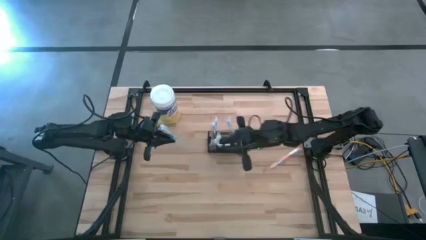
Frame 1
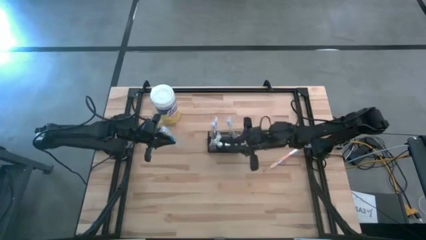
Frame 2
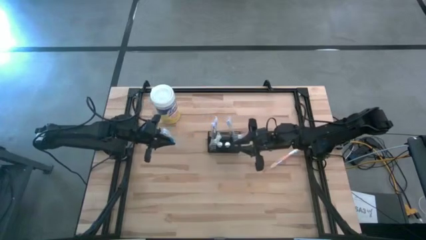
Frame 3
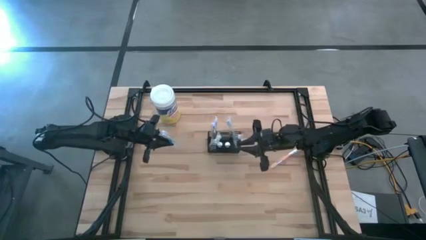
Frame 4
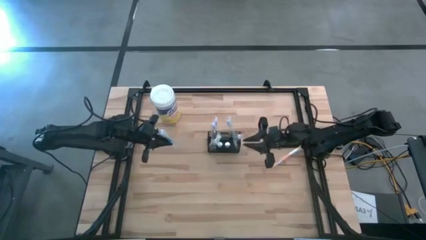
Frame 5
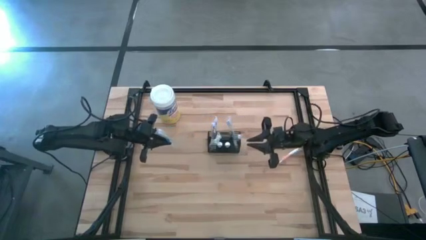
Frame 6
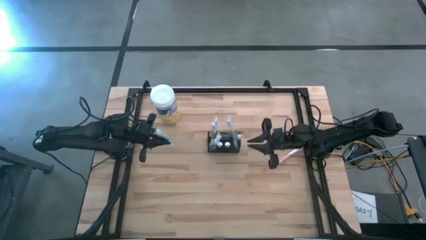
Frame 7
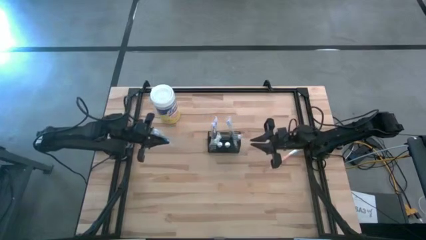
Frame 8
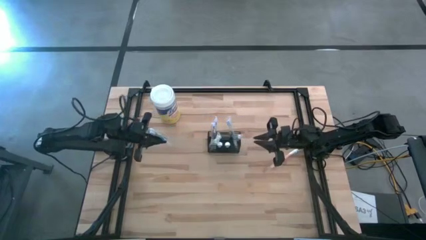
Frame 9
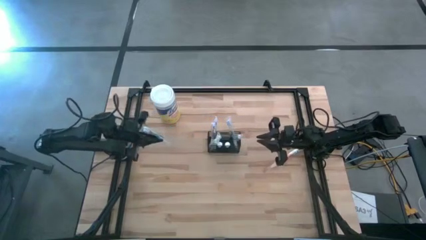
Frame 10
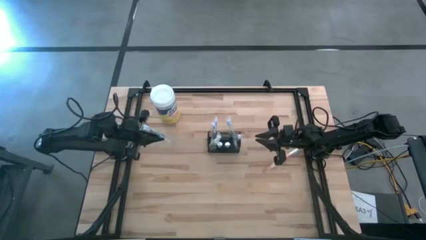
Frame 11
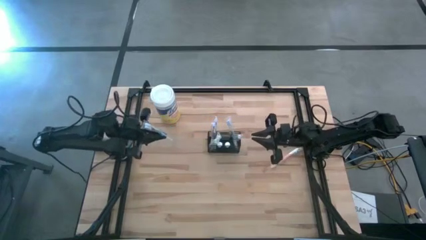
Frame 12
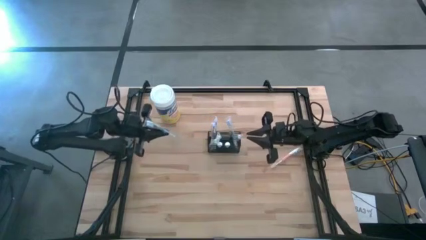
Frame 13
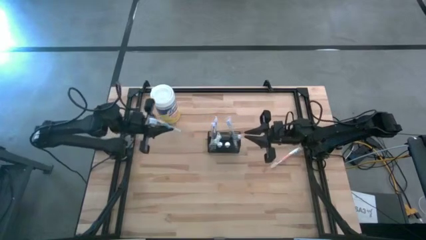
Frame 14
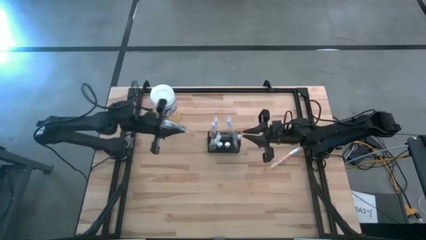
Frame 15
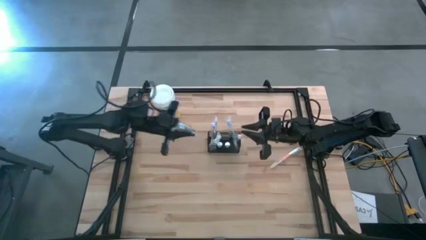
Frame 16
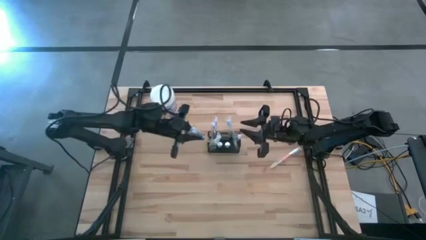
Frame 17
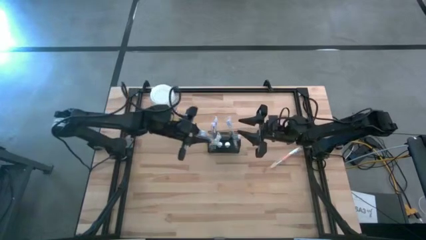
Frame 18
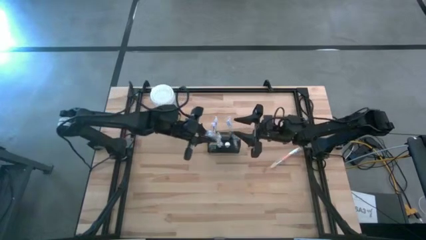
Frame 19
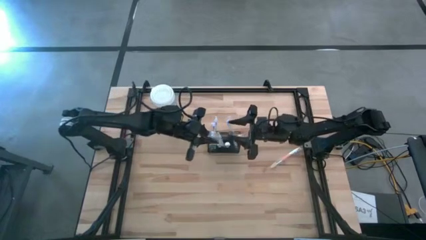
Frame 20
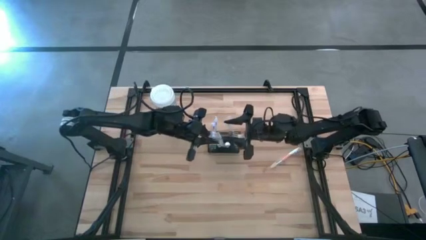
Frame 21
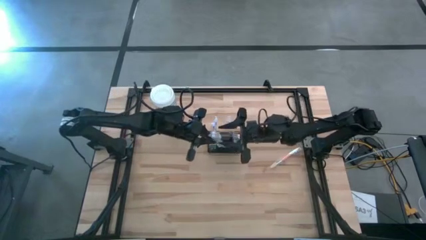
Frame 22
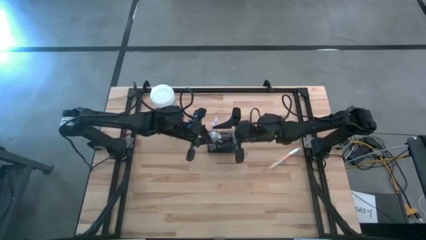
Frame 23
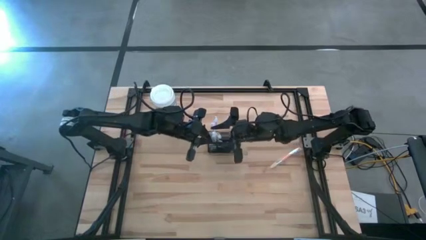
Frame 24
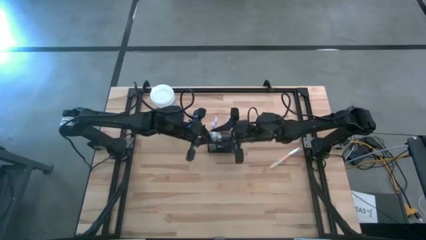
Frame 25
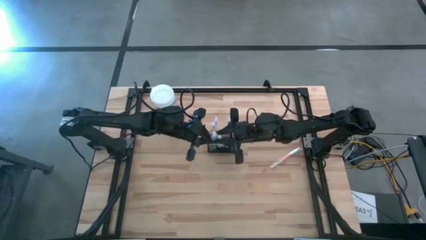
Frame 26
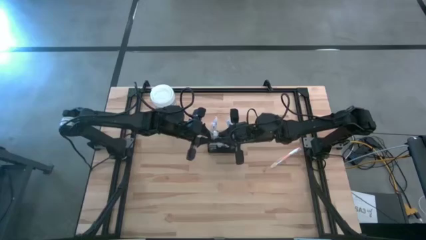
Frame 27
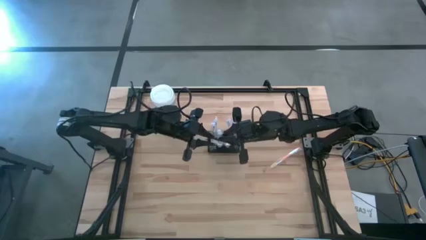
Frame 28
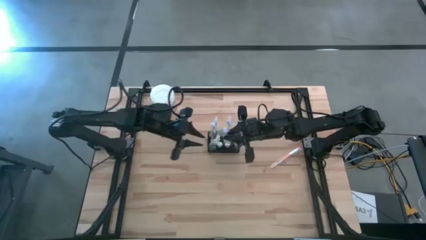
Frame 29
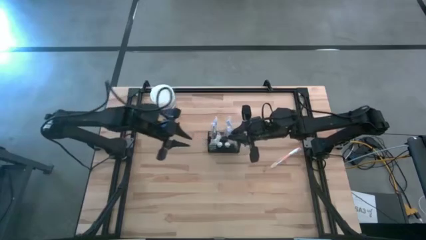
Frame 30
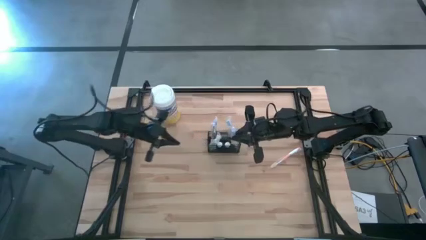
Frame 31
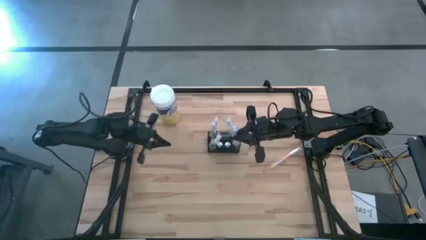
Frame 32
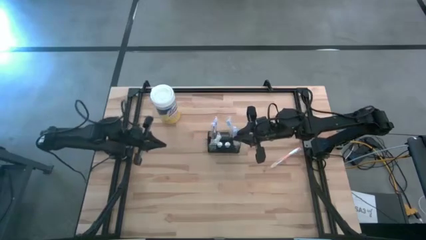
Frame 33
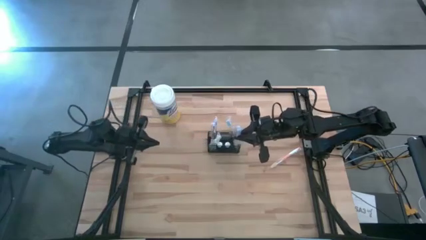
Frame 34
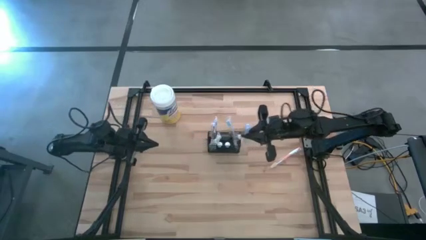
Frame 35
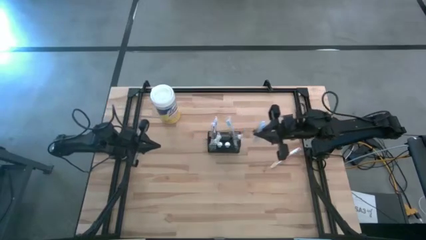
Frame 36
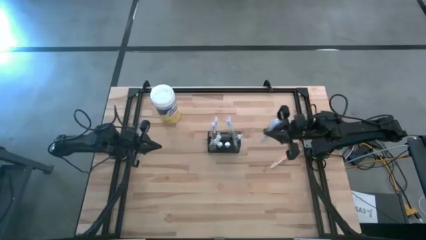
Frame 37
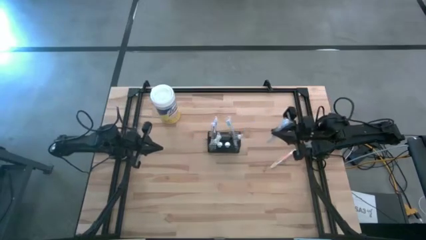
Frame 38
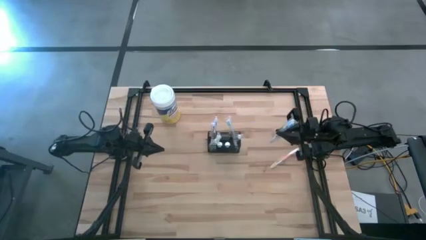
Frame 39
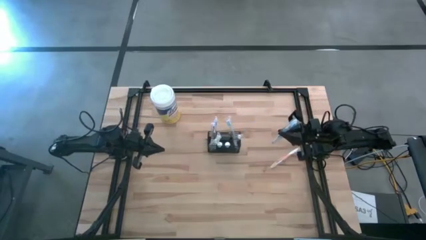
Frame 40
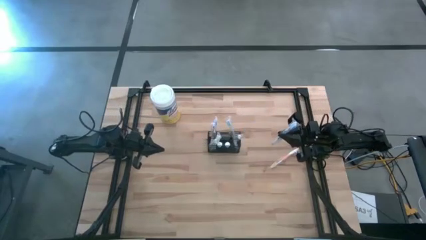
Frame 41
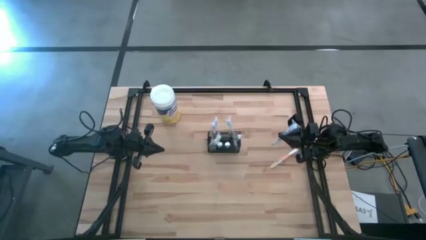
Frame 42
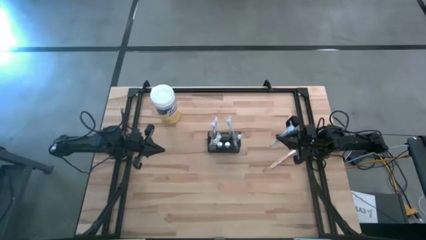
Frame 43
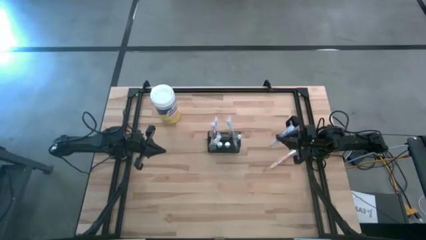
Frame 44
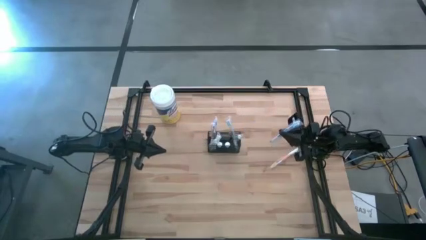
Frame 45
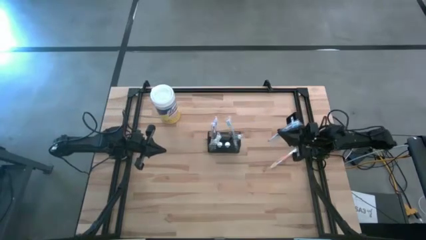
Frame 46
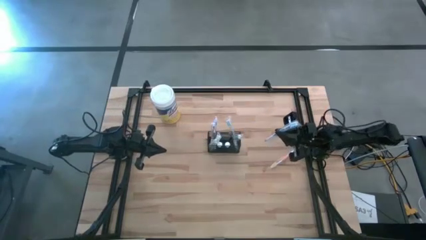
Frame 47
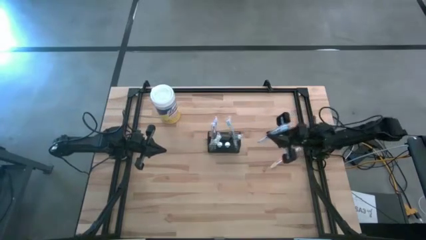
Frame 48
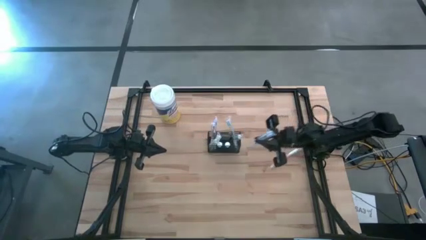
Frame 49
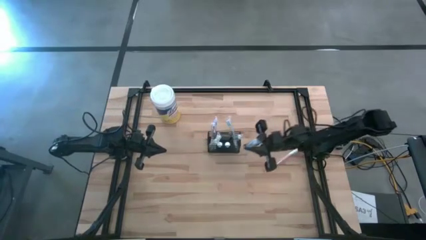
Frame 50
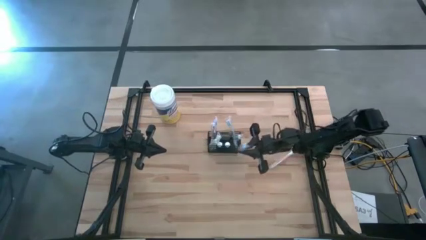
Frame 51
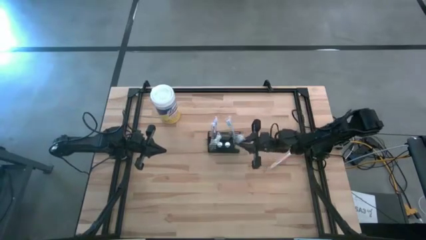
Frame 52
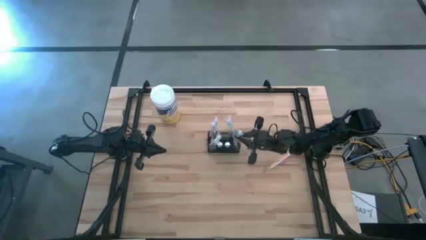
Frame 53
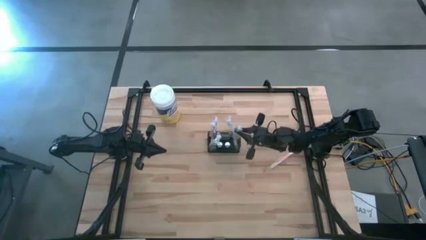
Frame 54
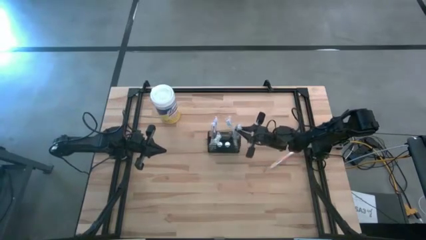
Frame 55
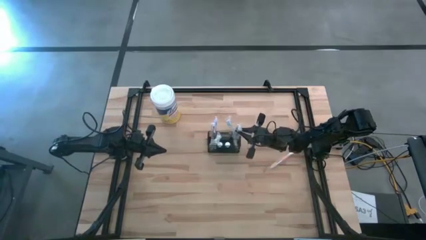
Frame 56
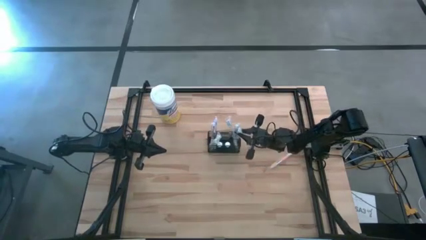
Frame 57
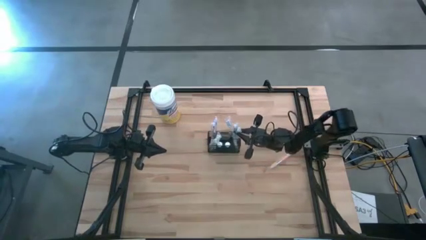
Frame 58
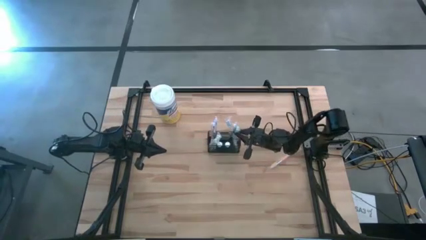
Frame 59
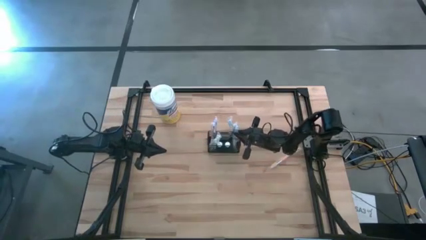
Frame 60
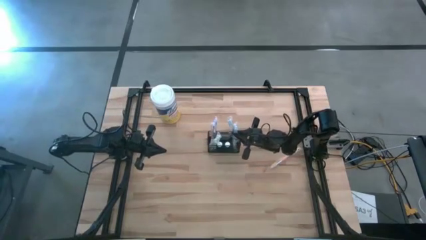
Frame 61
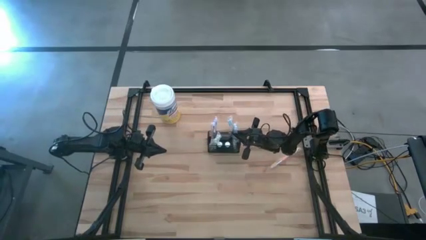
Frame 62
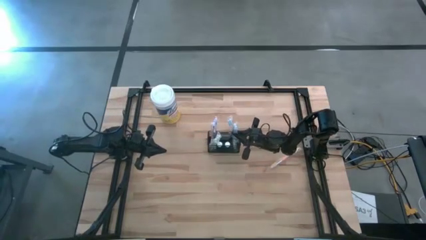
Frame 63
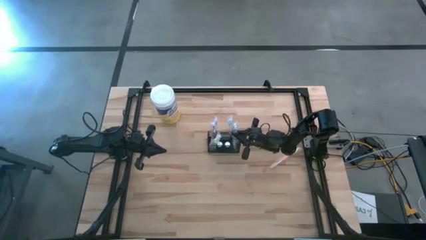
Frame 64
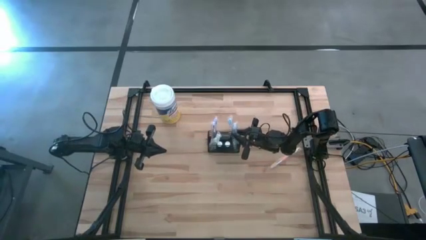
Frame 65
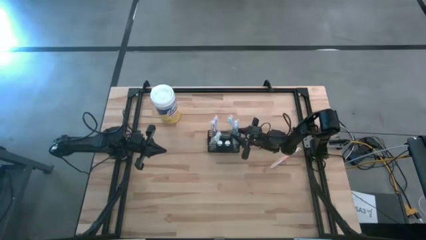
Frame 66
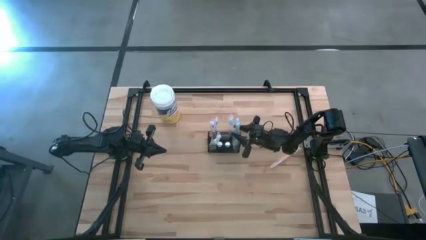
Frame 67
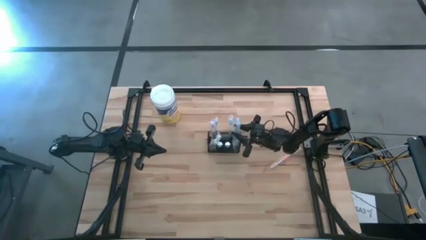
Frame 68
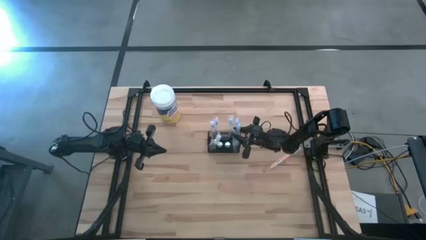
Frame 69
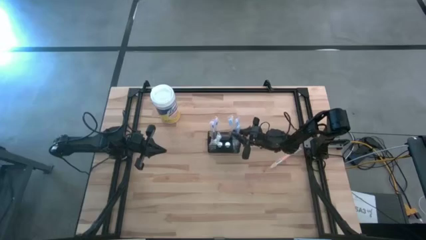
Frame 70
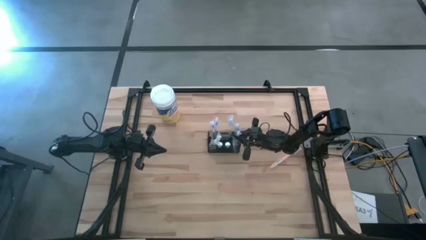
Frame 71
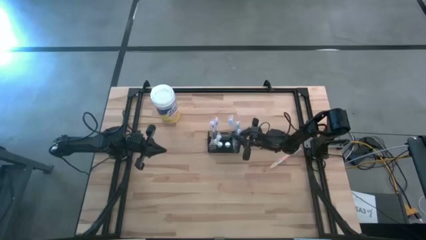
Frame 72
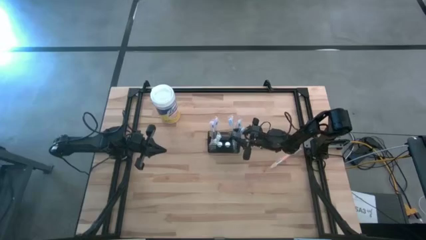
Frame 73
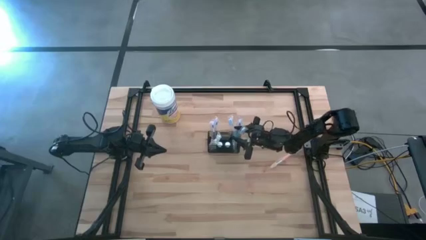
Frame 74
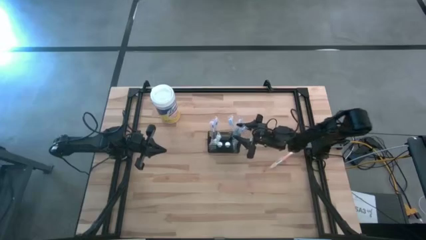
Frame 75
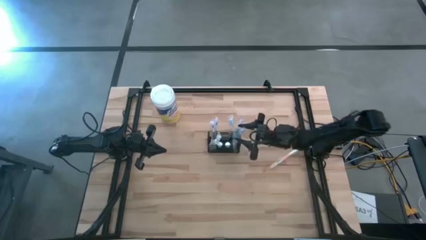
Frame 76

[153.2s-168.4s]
Task: Pick & Place toothbrushing station
Put the blue toothbrush into the wire organizer
